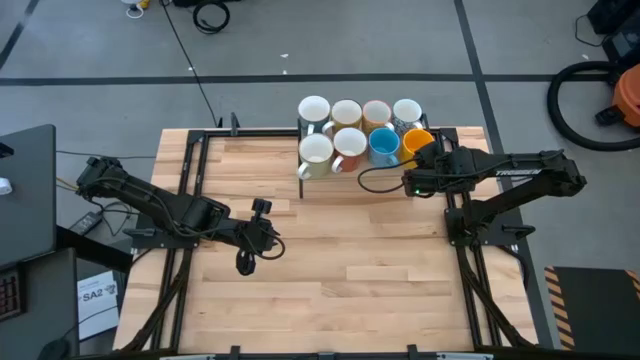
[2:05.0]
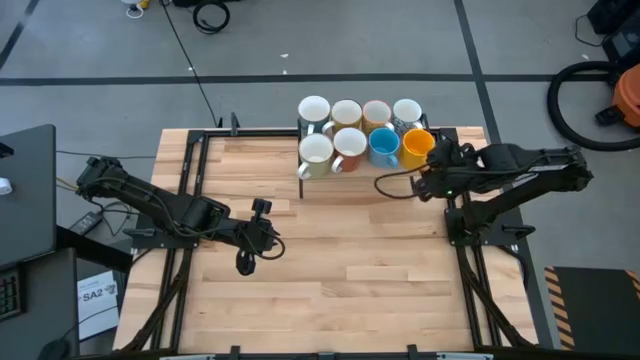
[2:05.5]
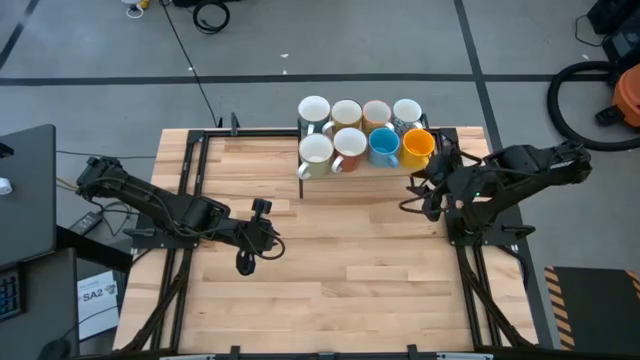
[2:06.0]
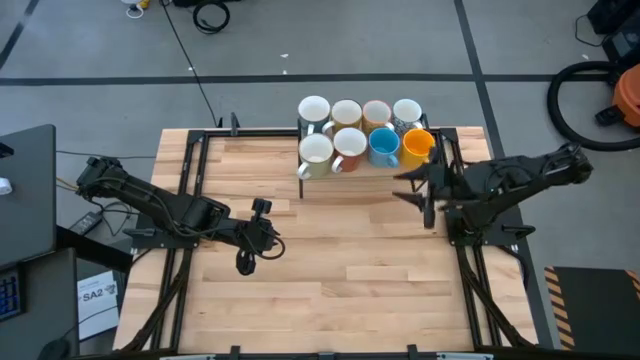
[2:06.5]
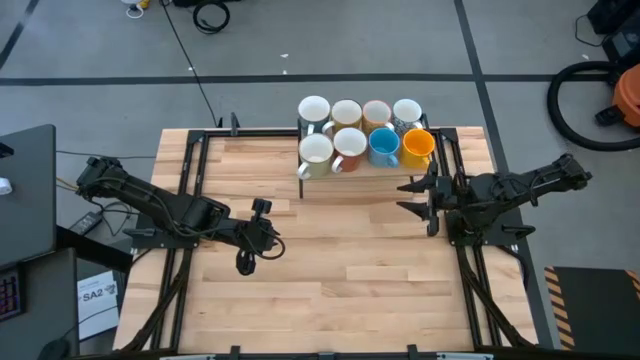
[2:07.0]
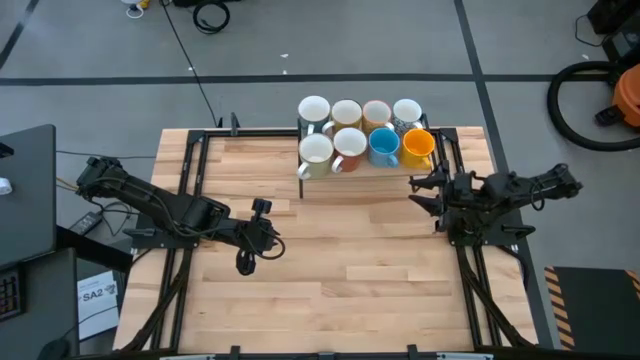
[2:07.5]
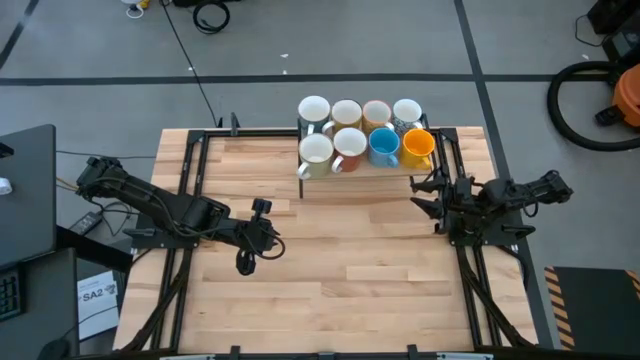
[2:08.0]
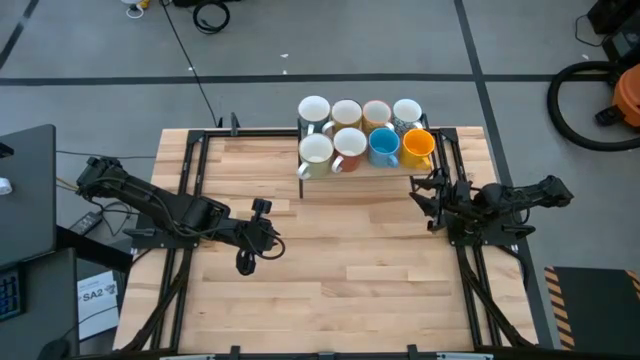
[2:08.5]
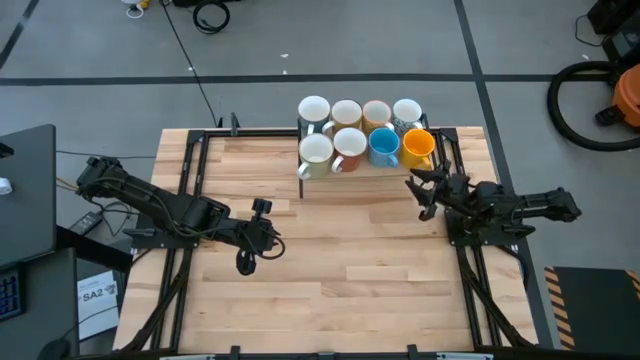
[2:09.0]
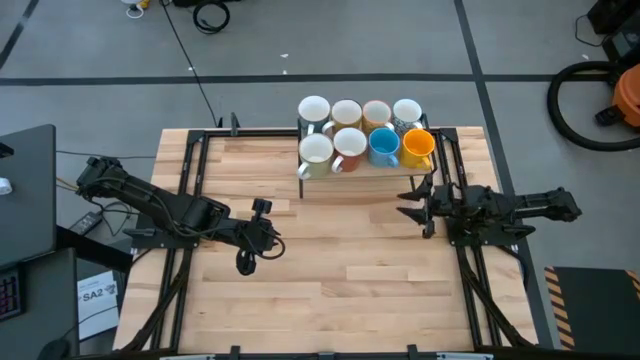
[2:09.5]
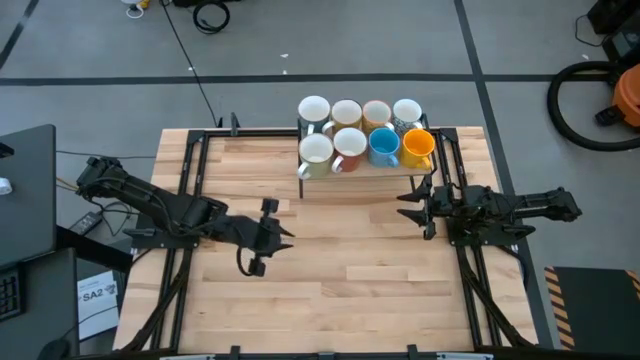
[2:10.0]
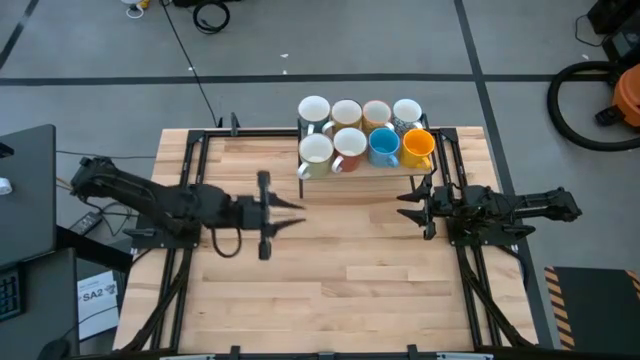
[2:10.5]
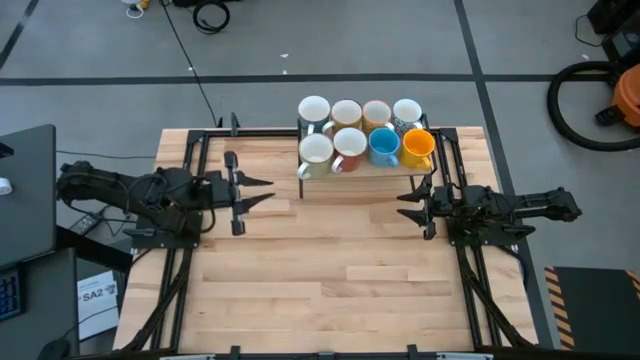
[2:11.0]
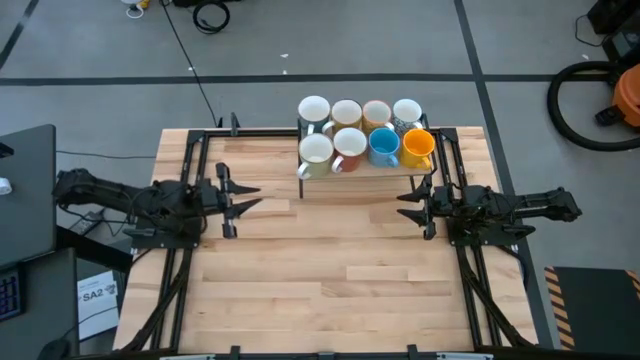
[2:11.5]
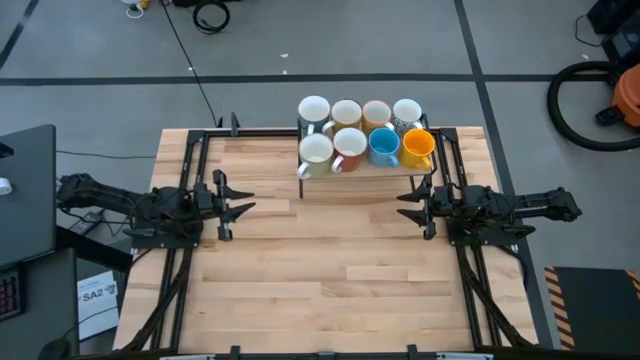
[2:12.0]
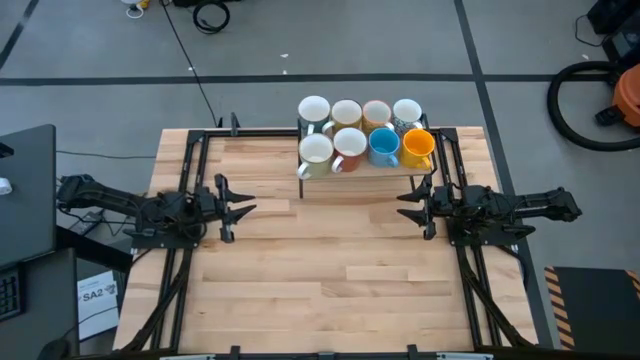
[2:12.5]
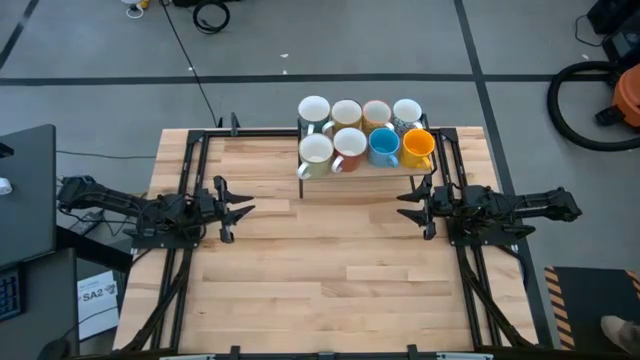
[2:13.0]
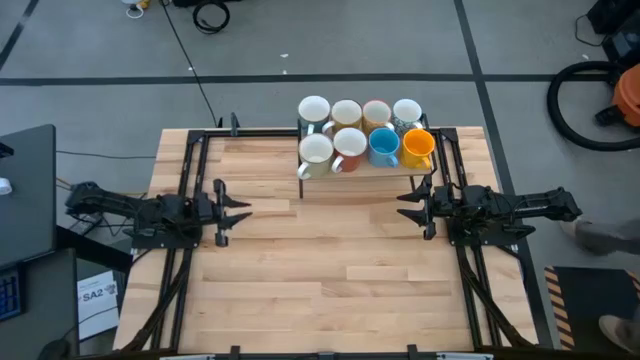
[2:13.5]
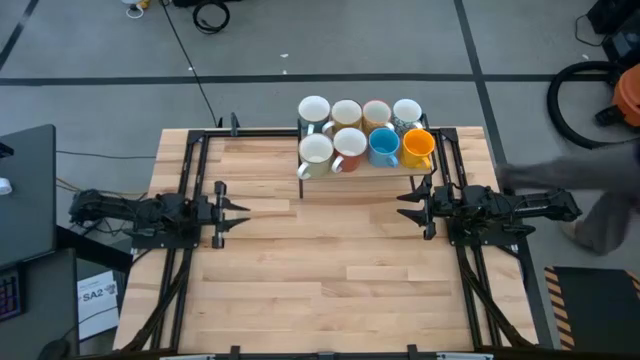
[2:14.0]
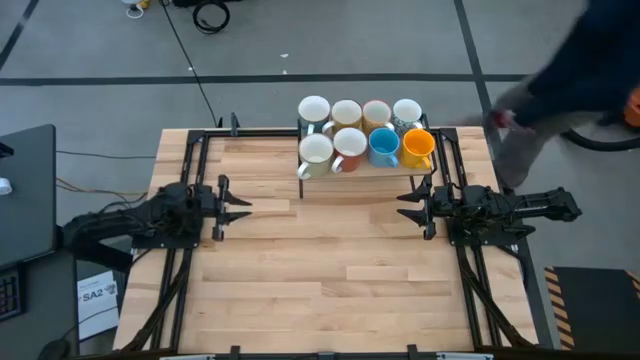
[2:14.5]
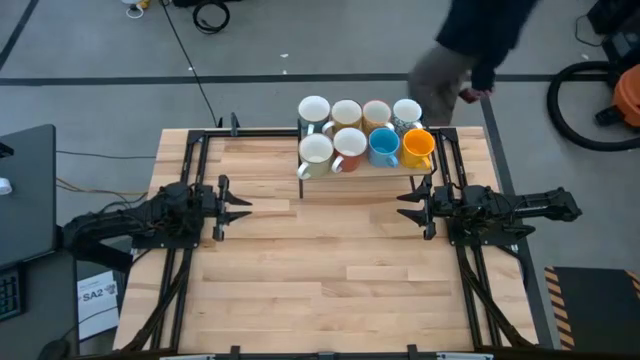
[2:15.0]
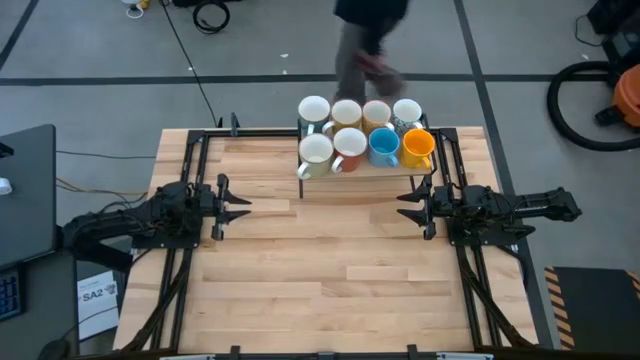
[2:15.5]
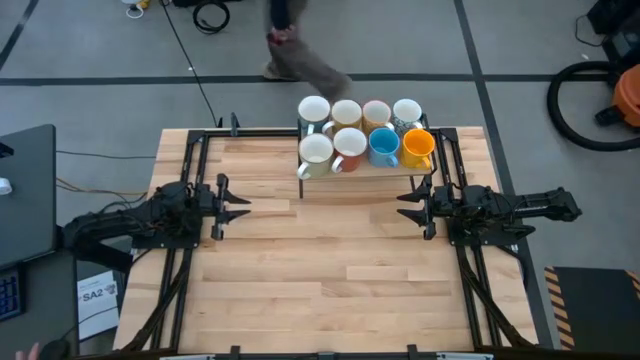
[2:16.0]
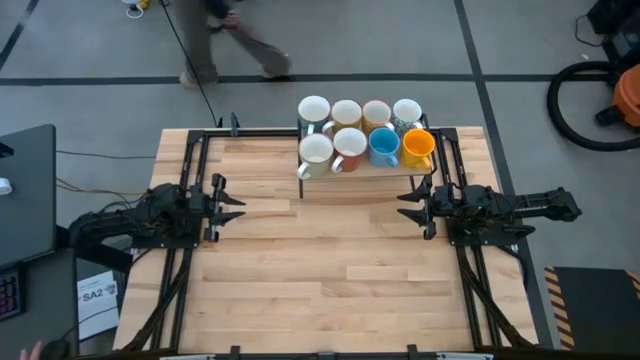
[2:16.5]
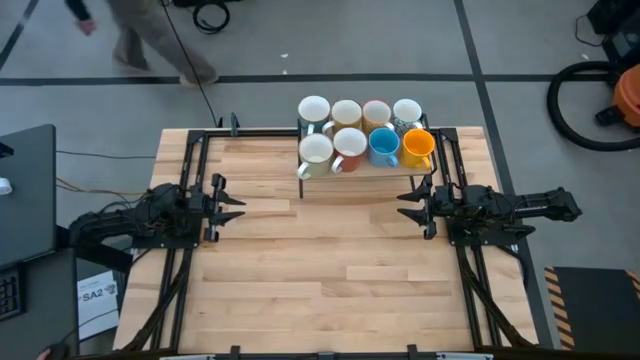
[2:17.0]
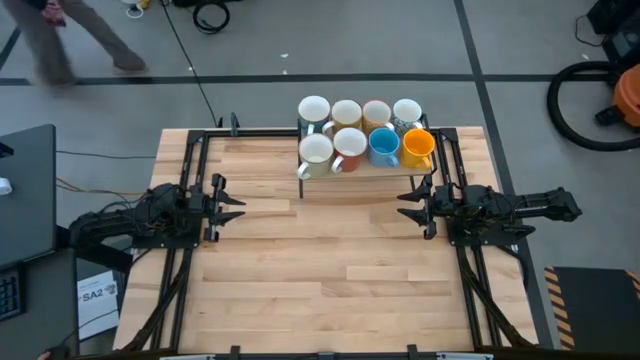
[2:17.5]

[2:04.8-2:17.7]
Task: Place coffee mugs
Return to Home Position

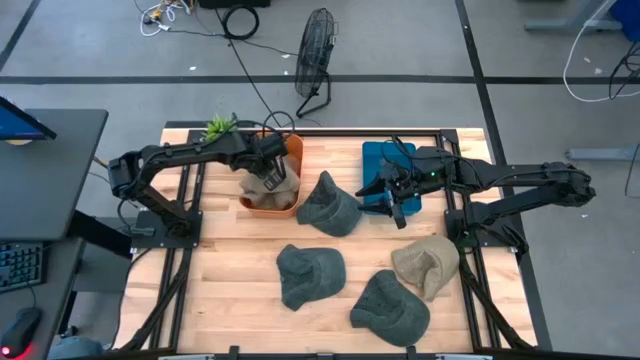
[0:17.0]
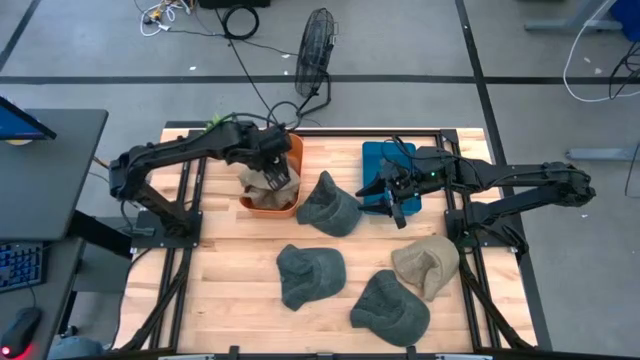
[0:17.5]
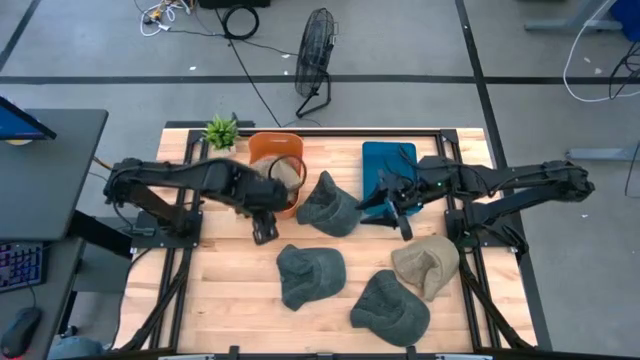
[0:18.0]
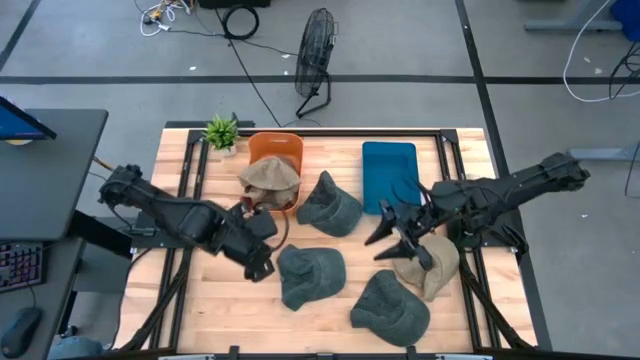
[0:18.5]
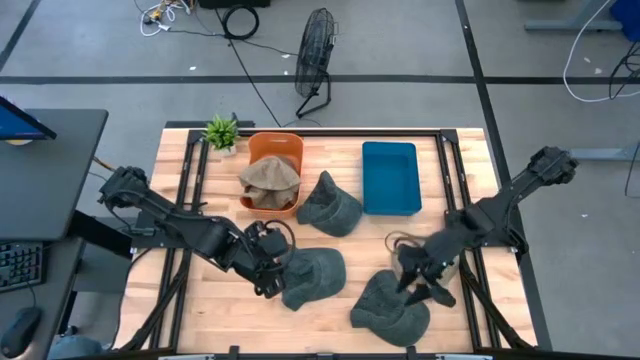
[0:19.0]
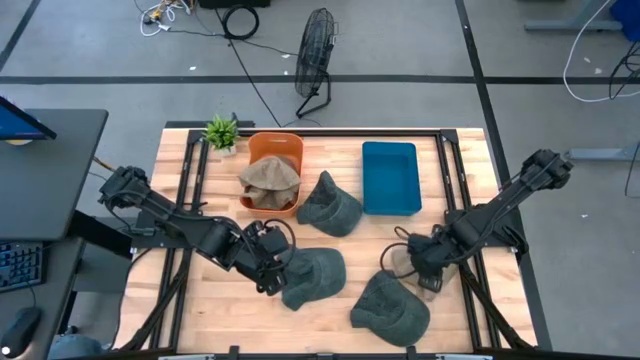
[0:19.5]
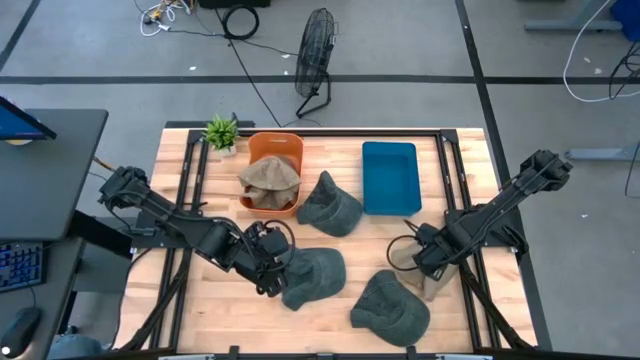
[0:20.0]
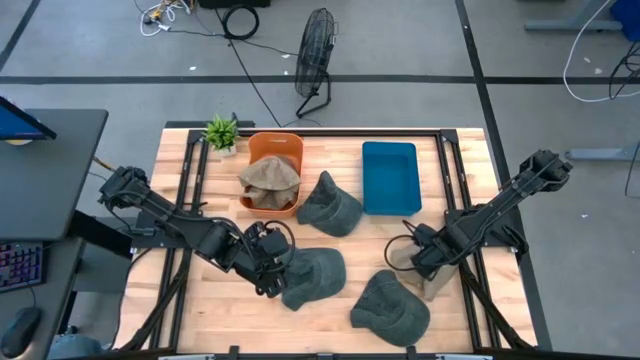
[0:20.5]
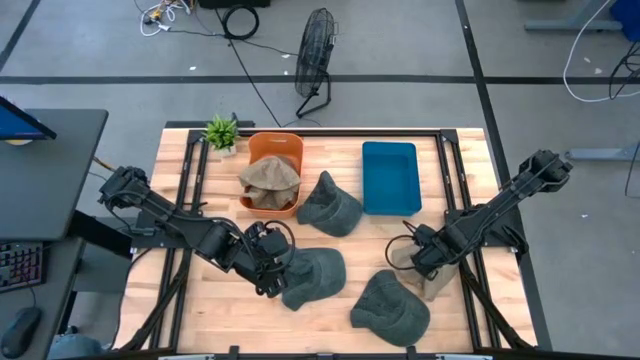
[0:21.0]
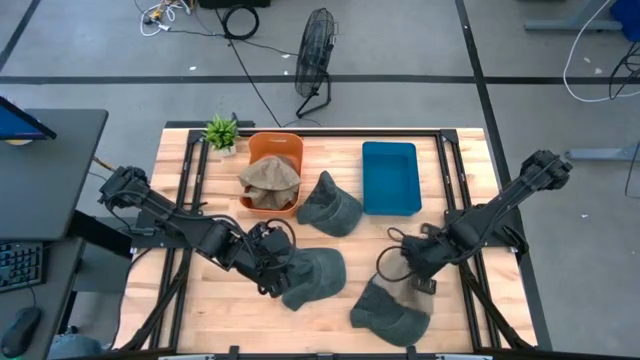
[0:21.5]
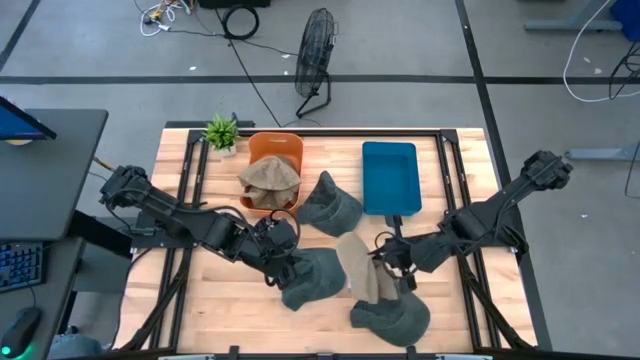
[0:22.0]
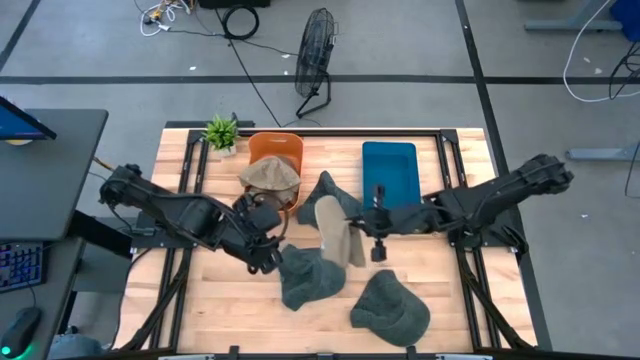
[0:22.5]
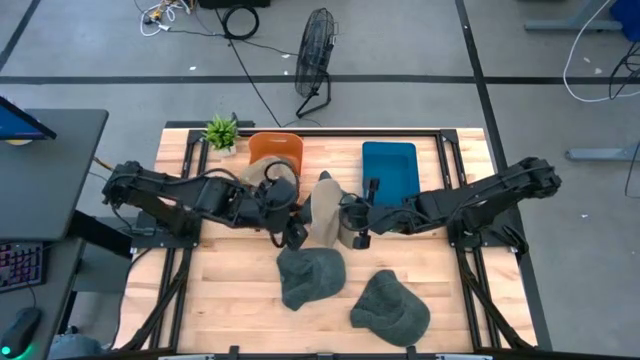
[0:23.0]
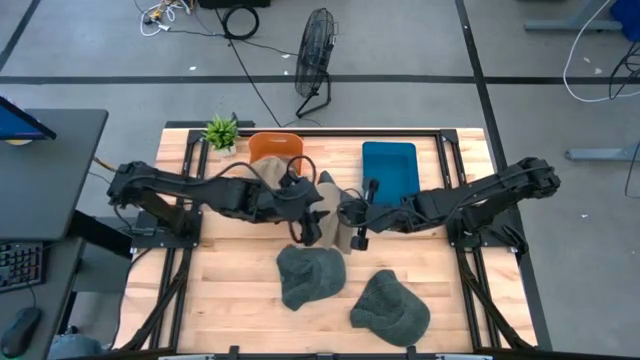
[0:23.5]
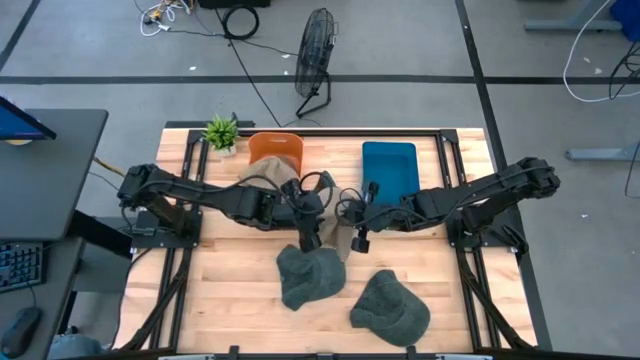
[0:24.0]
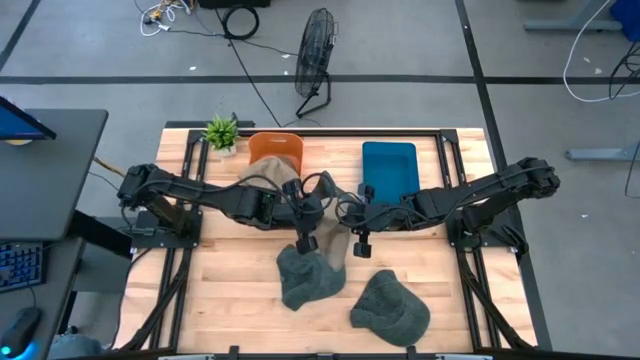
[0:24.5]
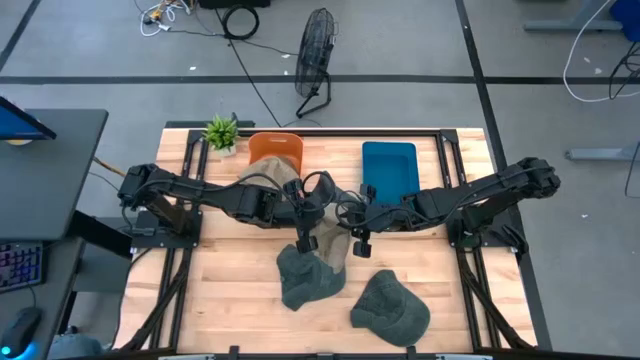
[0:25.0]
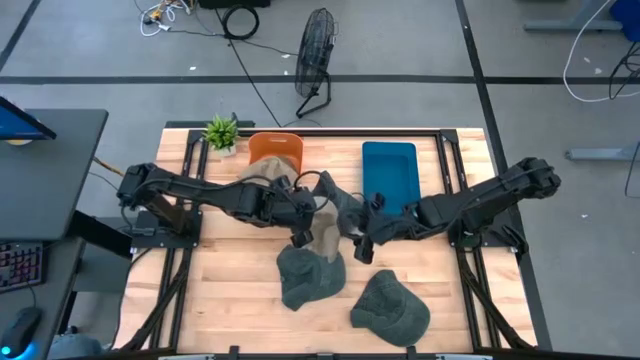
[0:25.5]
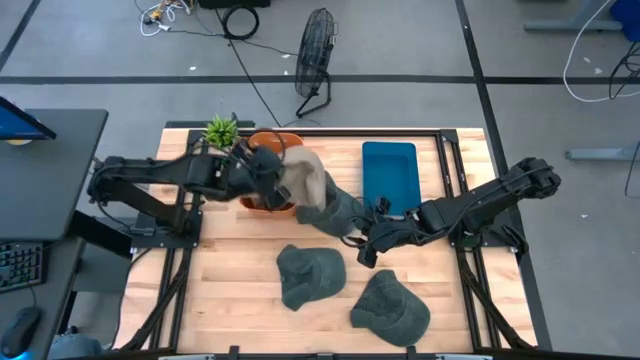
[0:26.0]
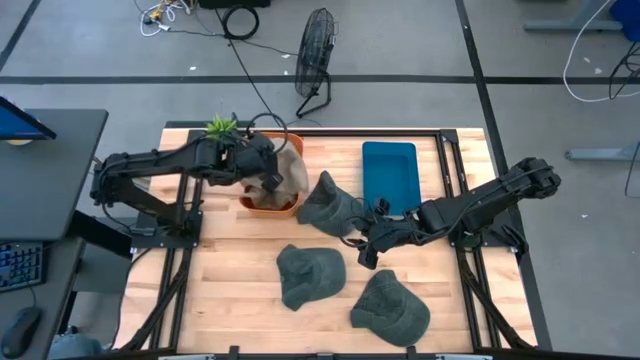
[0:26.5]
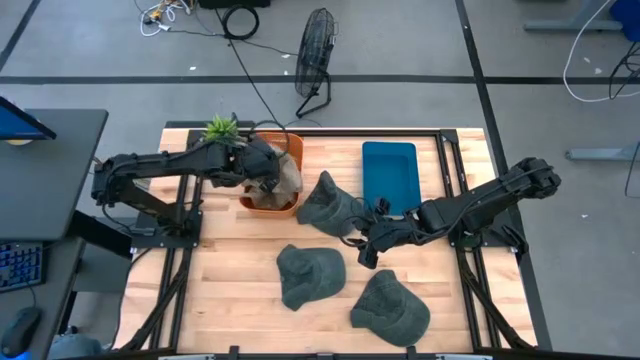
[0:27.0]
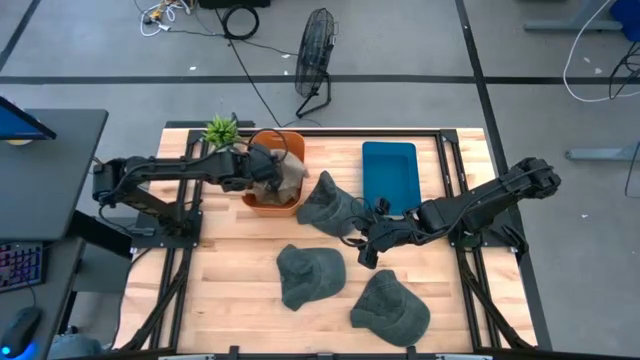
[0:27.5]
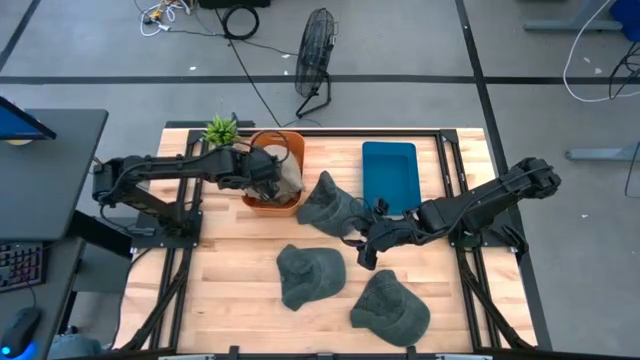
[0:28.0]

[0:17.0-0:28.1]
Task: Pick & Place hat
Put the brown cap into the orange bin
